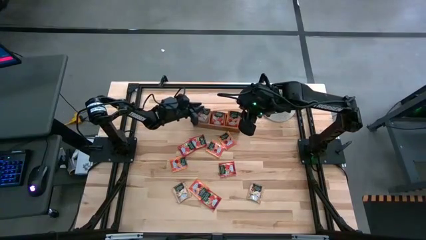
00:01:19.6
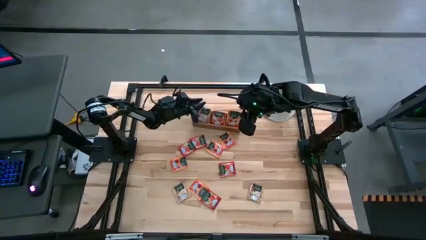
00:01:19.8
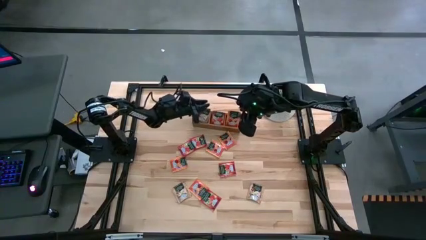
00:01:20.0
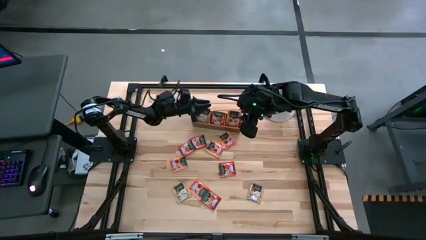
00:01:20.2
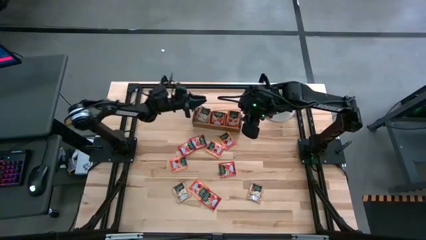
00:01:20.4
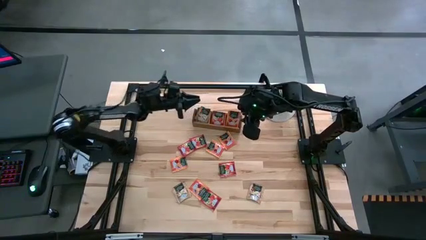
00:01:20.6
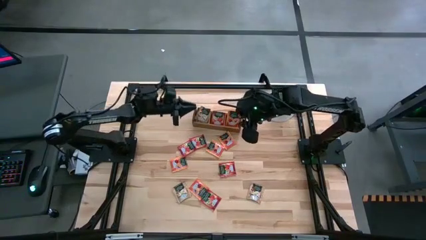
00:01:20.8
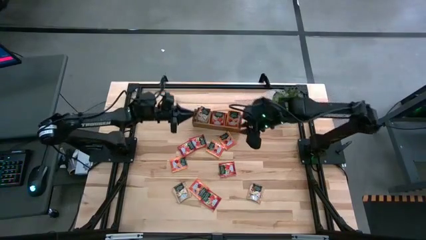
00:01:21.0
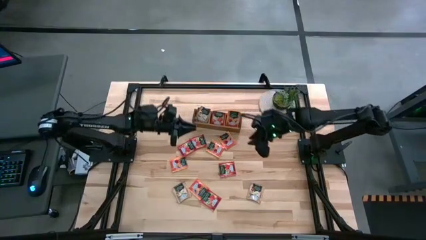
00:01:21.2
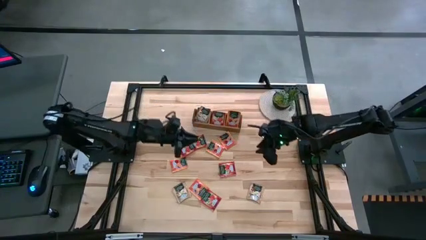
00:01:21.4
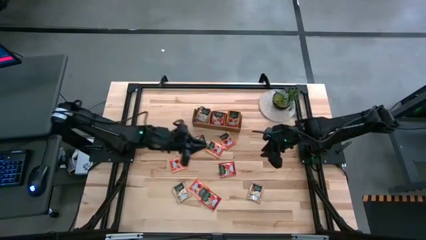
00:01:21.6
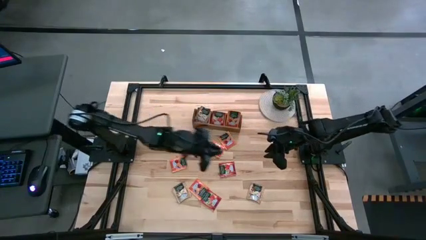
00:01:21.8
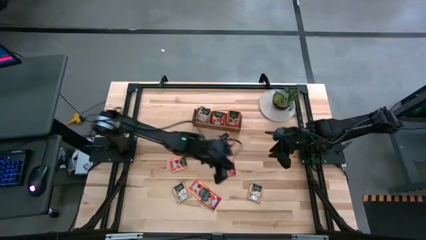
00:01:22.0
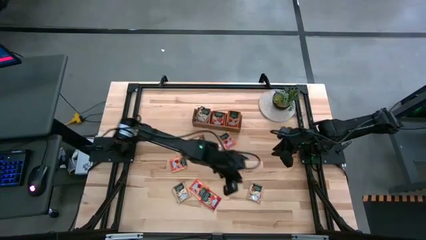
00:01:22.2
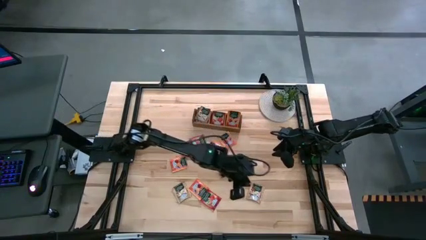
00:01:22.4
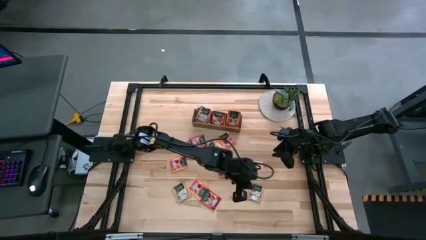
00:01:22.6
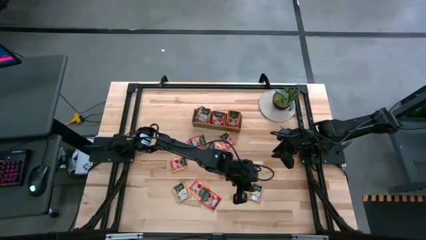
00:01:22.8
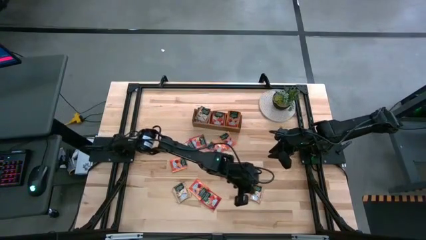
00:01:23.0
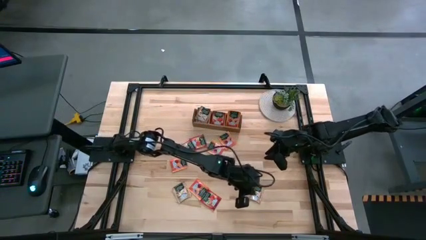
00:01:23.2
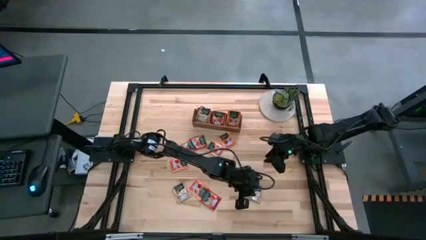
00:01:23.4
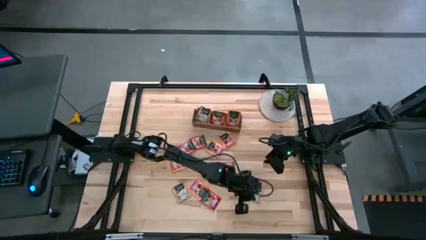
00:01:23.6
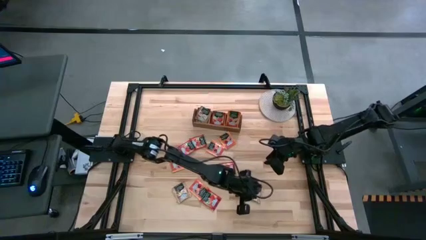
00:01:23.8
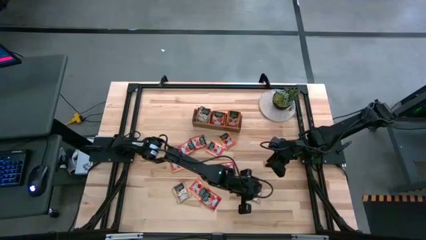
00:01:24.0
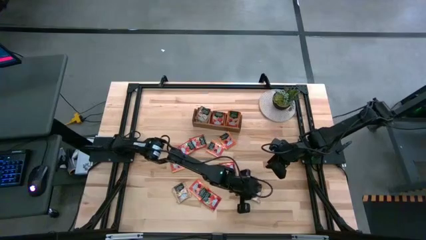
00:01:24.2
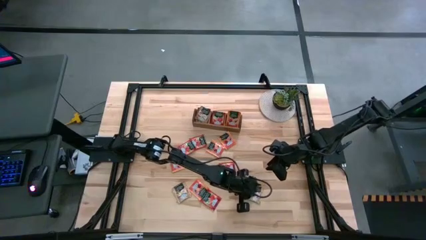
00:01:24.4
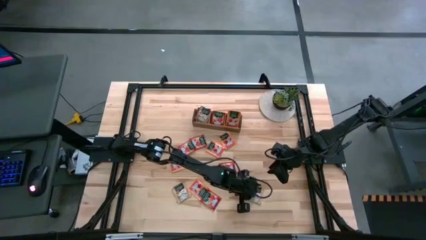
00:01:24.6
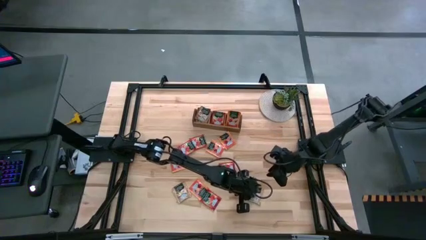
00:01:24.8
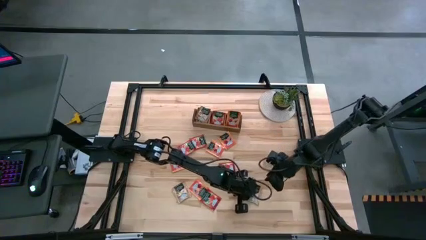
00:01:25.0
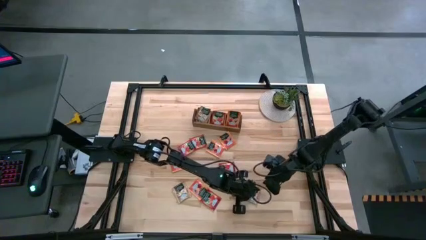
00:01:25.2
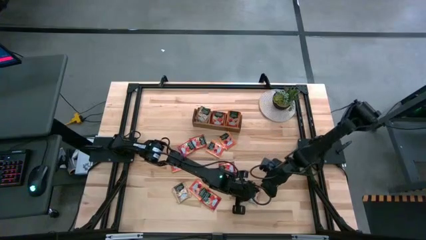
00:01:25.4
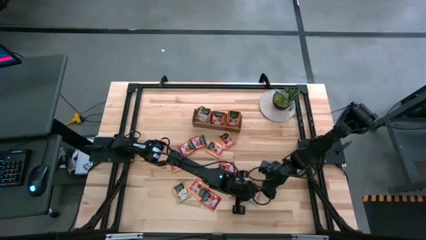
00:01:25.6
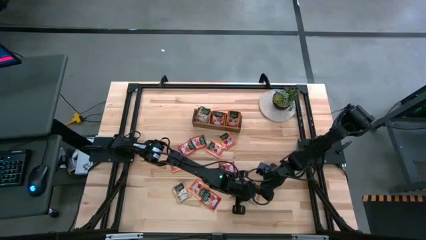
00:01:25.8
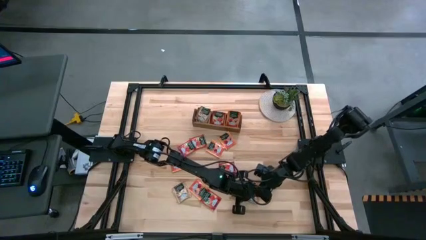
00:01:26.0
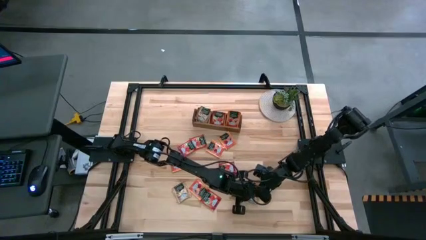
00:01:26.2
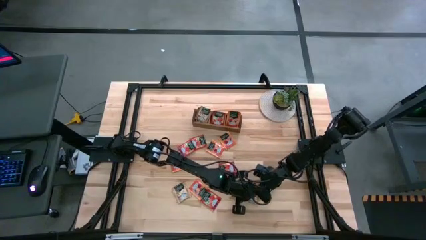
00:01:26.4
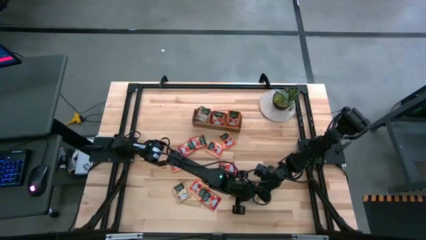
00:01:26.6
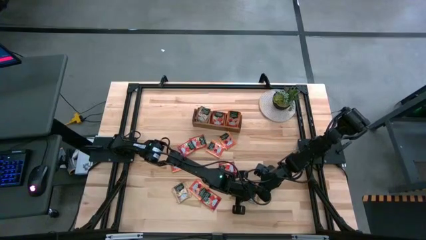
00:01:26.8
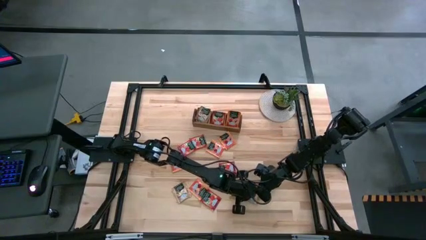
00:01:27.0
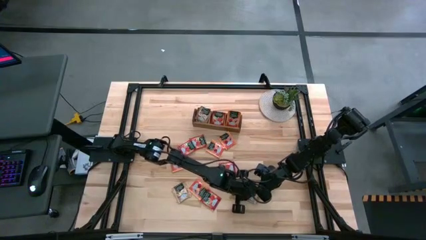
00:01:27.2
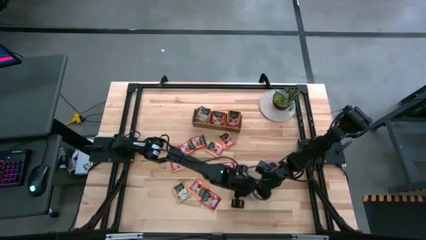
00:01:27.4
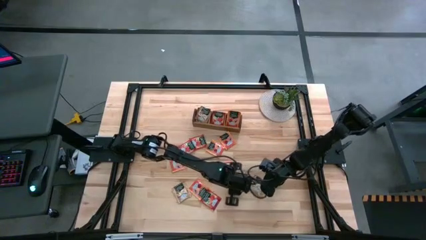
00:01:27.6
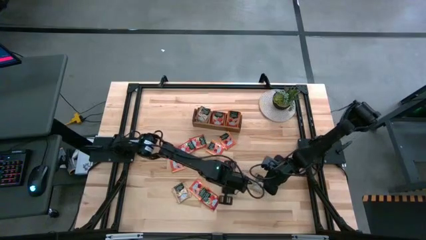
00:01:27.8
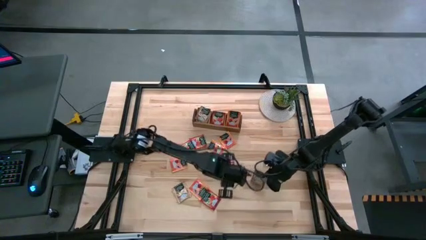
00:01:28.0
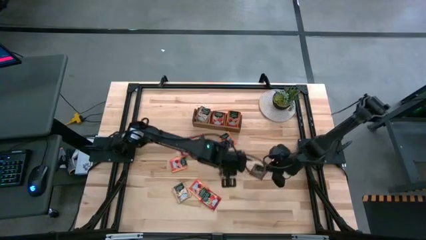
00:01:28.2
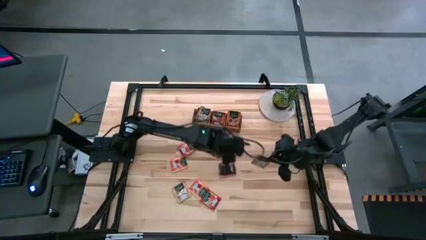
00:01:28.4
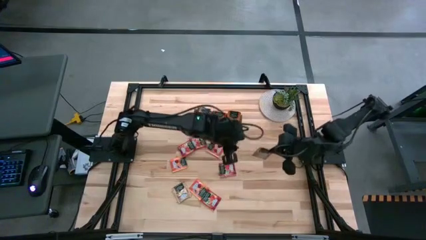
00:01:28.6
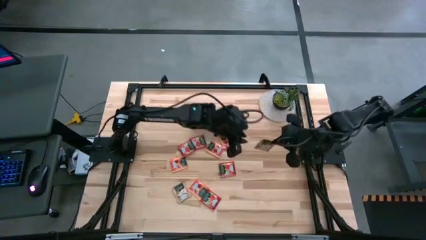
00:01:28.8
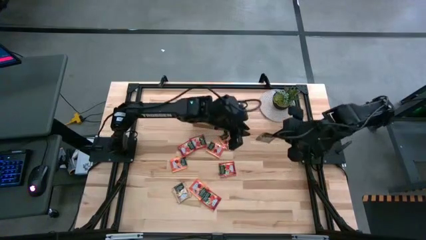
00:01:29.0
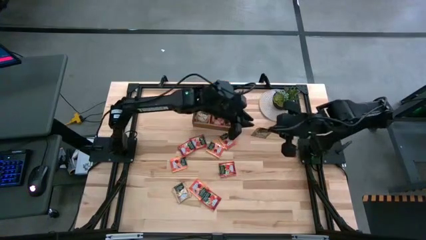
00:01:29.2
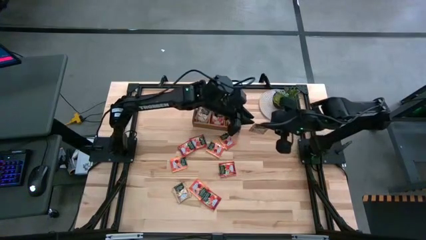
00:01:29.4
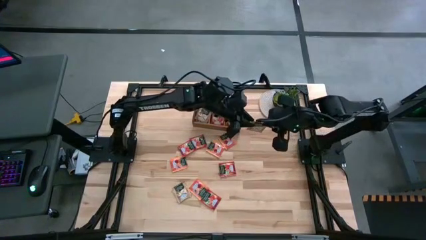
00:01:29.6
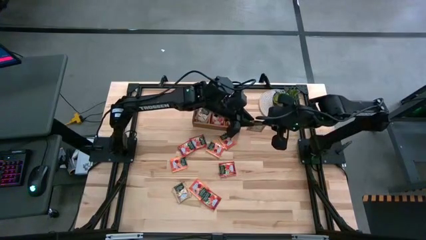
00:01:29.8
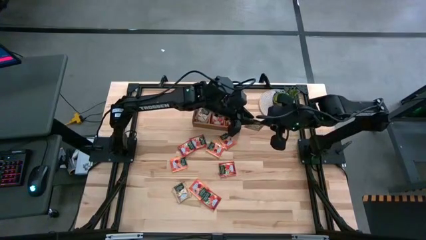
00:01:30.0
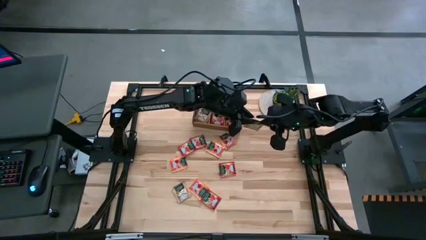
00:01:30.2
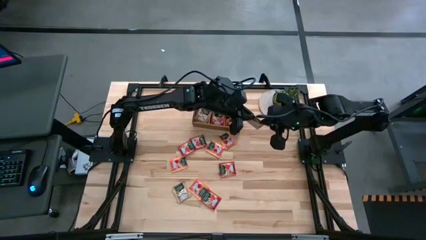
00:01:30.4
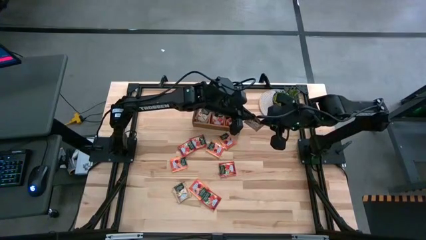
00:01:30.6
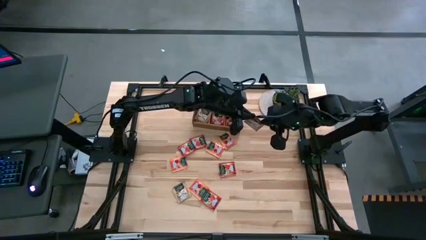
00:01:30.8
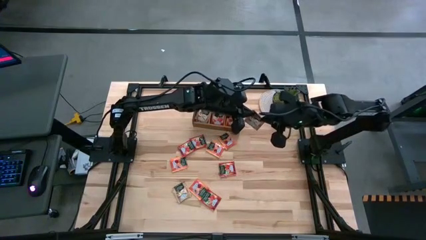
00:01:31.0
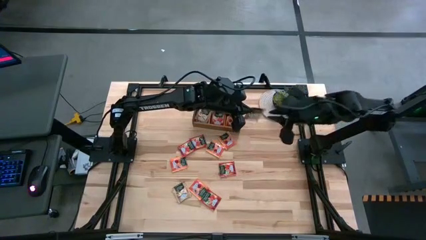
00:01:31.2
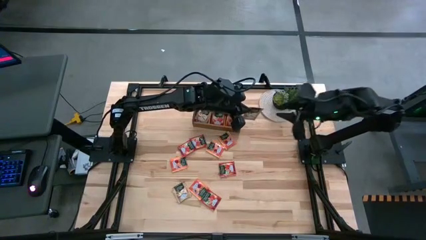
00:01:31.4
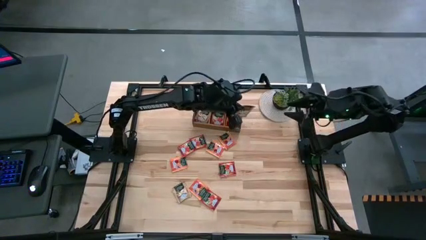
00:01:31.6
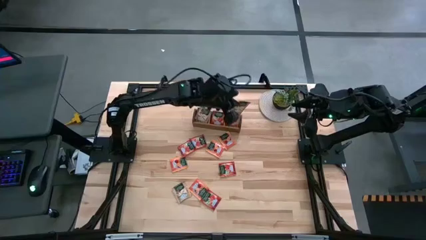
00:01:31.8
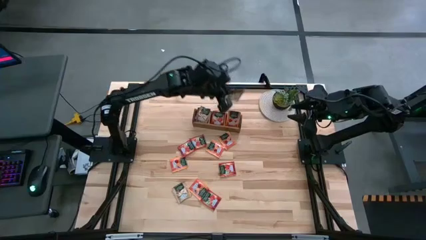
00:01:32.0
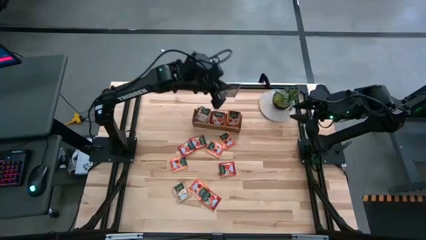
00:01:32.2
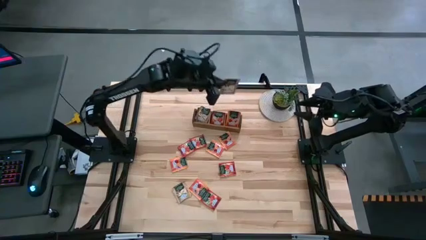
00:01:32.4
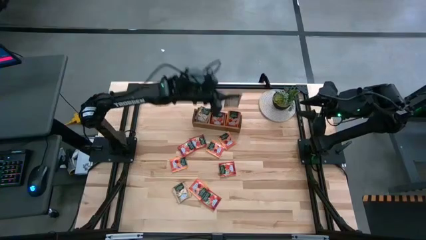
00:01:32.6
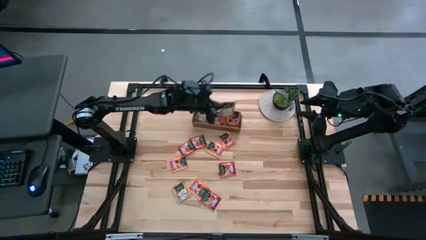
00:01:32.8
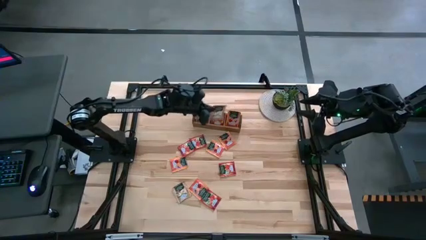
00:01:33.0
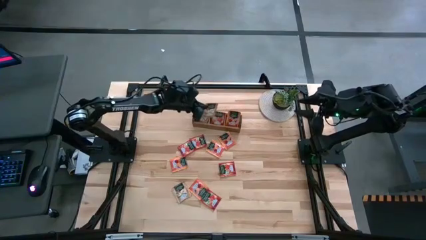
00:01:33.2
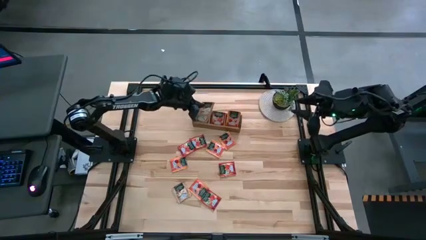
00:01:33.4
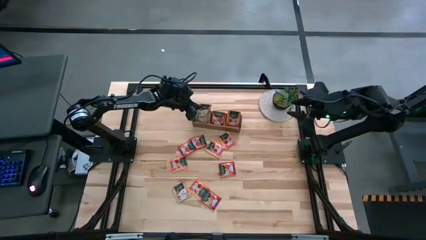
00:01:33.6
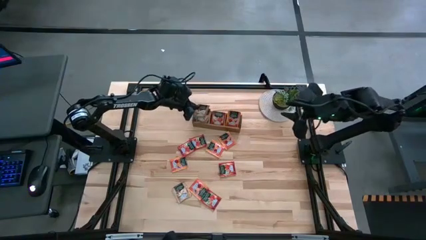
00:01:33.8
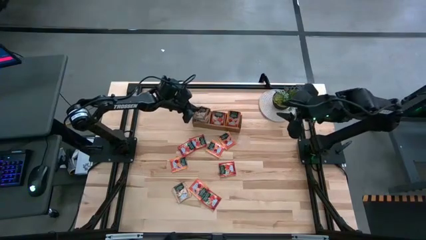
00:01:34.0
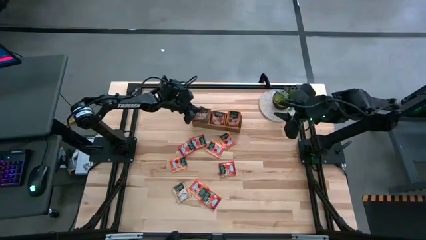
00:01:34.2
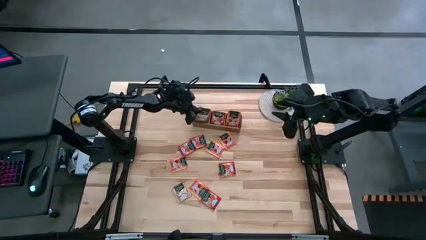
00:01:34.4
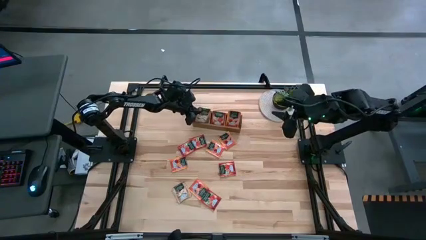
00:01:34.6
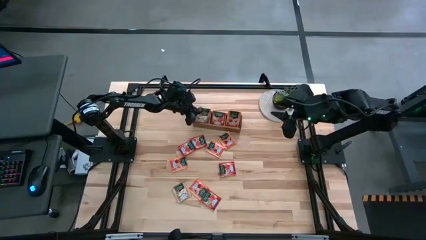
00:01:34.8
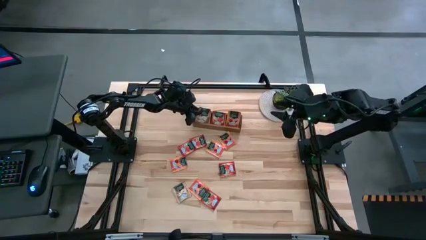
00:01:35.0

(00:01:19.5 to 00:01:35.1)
Task: Pick & Place Tea
Put the brown tea bag into the left section of the wooden organizer
